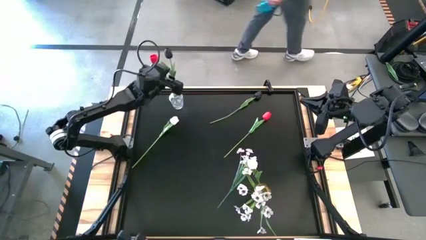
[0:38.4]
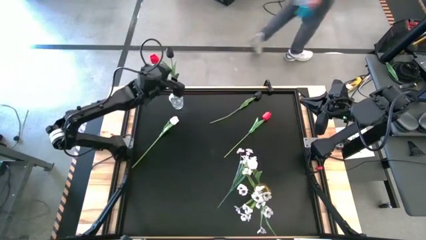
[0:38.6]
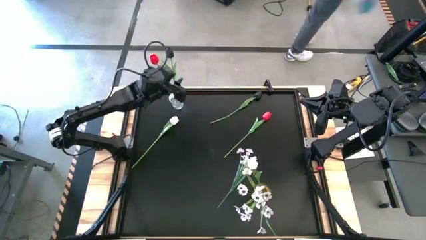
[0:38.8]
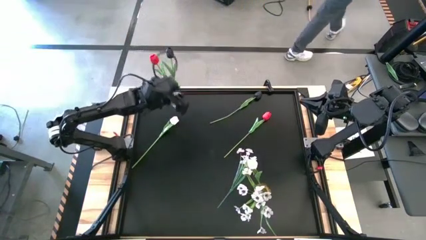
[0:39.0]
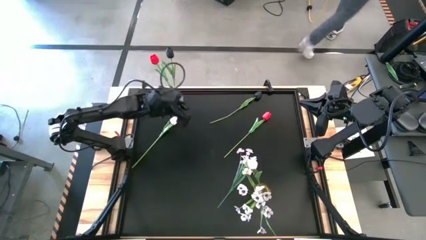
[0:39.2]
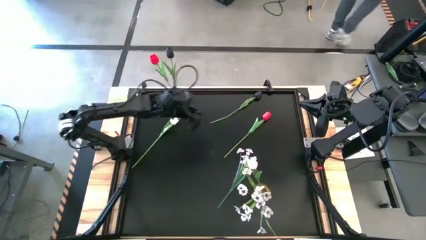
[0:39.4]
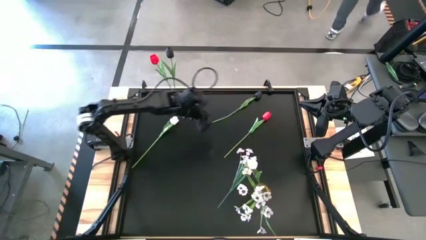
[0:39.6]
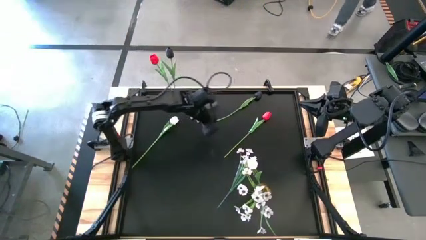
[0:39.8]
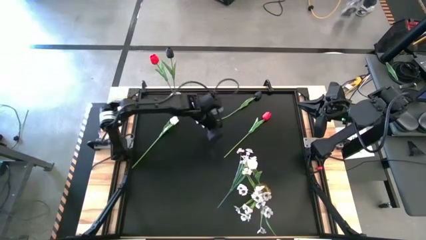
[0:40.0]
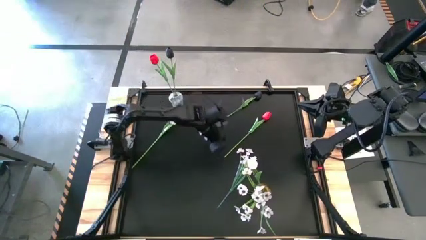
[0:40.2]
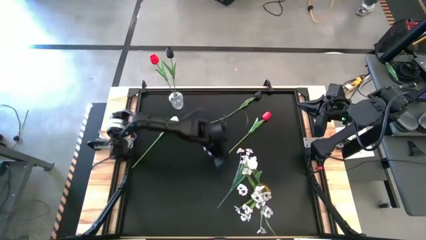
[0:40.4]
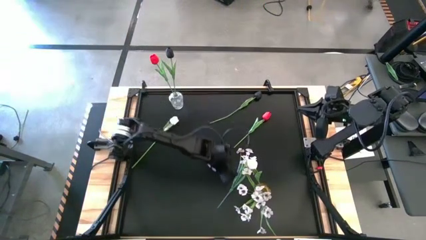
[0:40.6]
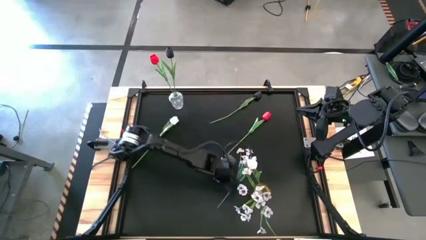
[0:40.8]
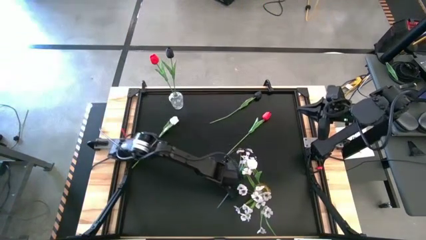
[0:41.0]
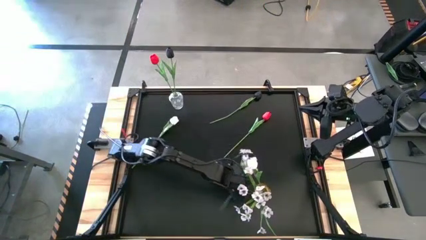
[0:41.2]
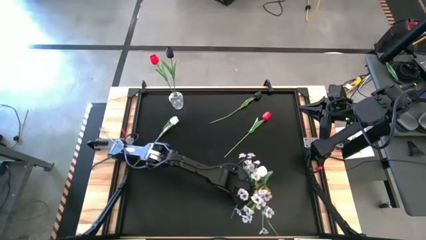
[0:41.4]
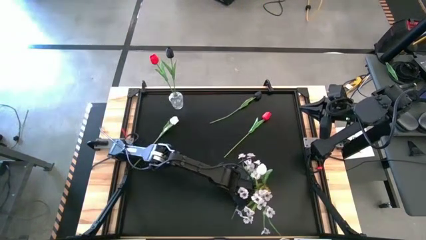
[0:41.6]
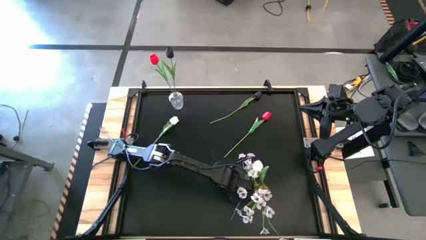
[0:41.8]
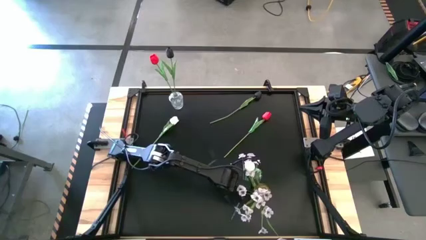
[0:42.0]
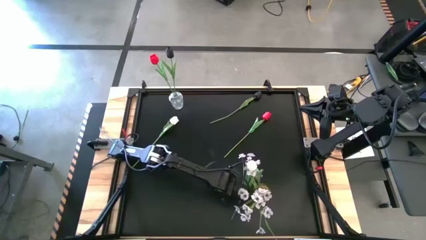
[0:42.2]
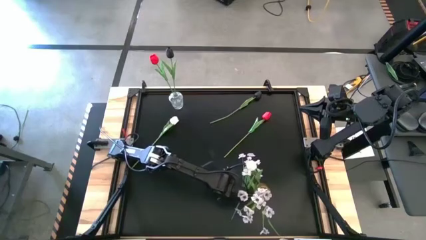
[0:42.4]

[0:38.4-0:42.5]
Task: Sort flowers into vase by color
Put the white flower into the yellow vase

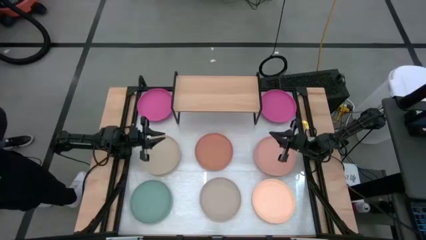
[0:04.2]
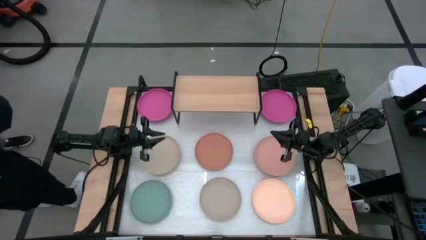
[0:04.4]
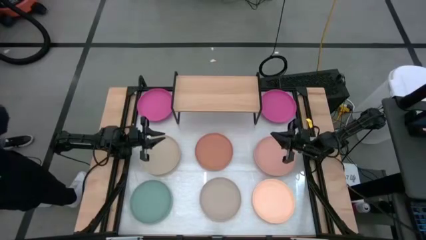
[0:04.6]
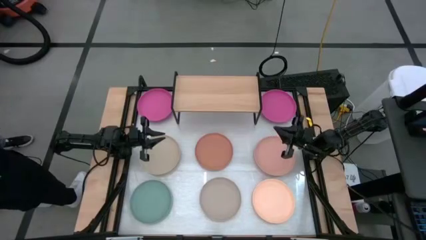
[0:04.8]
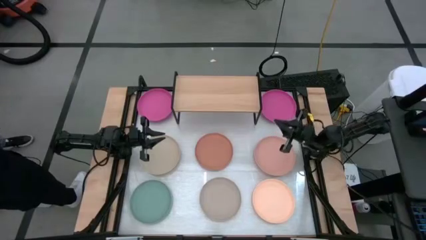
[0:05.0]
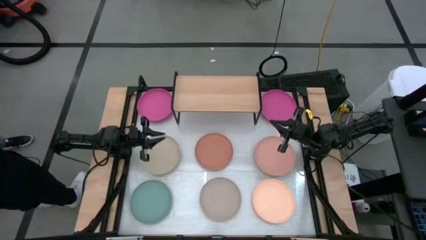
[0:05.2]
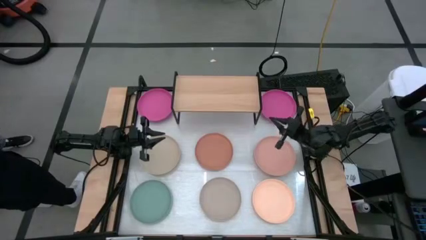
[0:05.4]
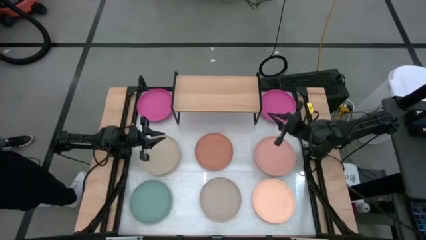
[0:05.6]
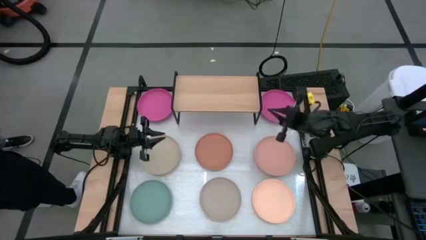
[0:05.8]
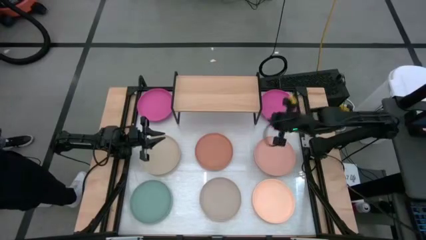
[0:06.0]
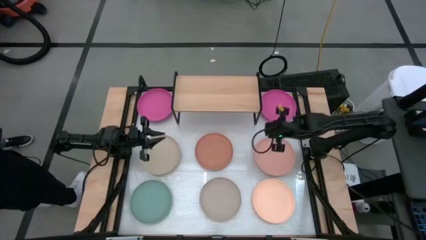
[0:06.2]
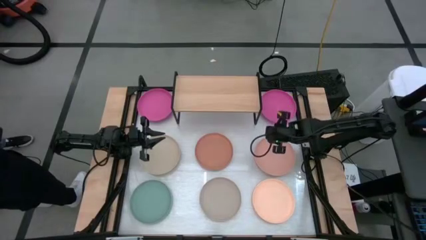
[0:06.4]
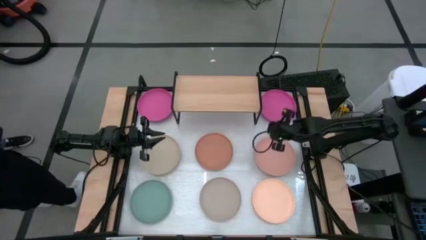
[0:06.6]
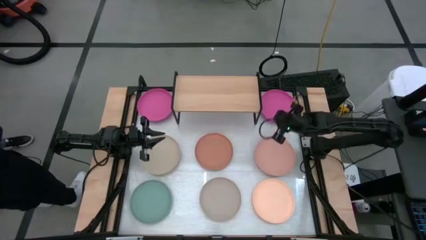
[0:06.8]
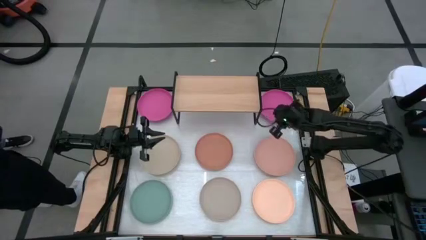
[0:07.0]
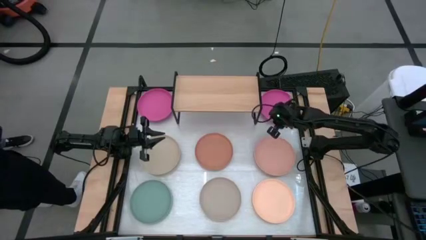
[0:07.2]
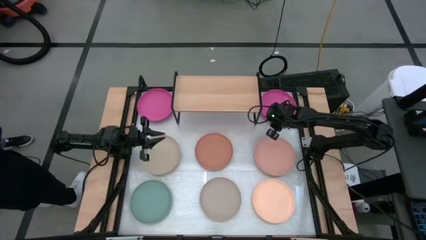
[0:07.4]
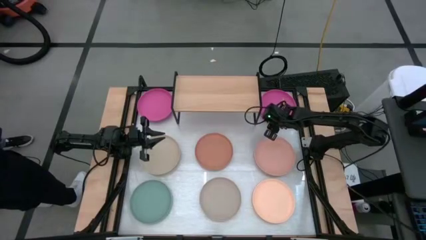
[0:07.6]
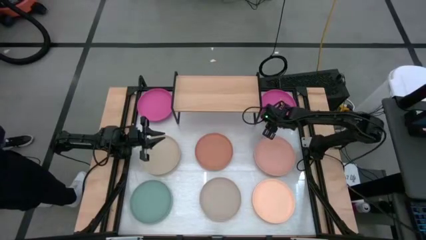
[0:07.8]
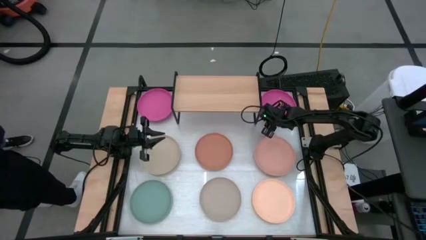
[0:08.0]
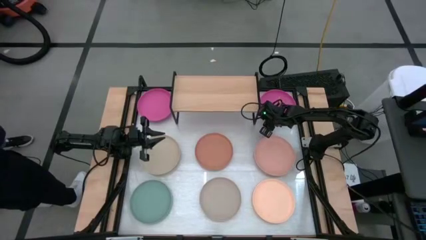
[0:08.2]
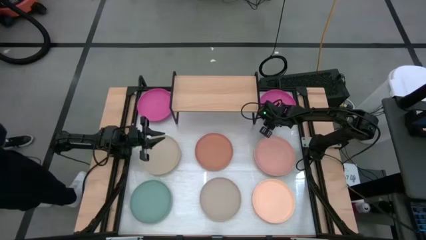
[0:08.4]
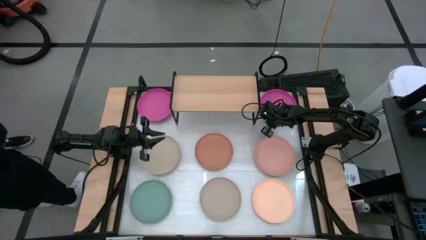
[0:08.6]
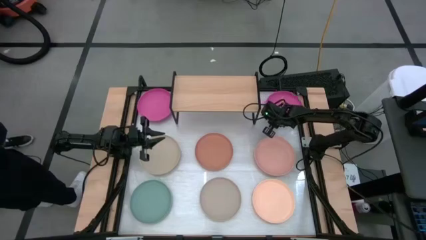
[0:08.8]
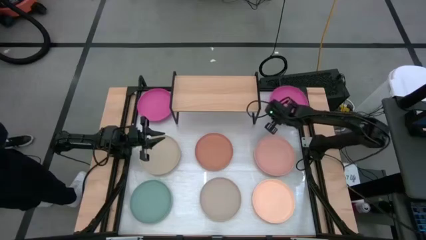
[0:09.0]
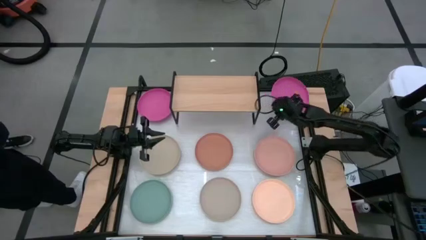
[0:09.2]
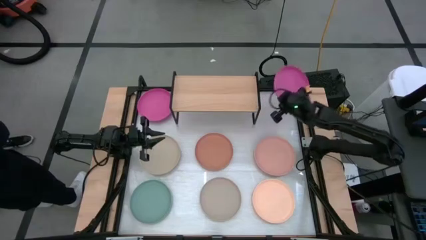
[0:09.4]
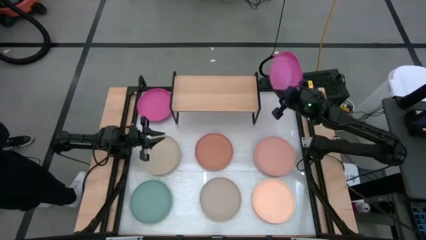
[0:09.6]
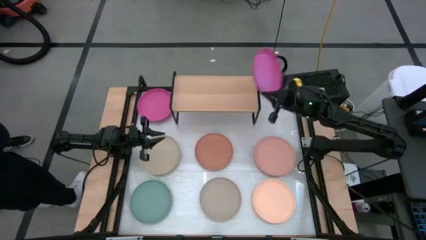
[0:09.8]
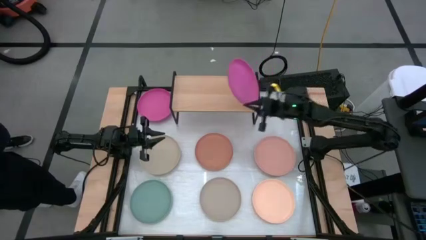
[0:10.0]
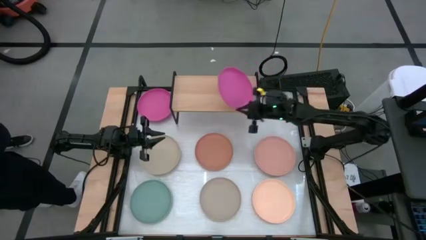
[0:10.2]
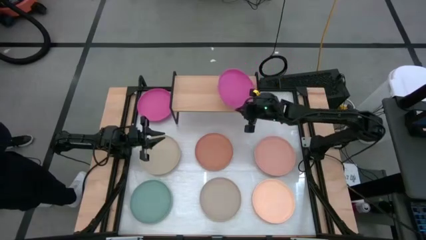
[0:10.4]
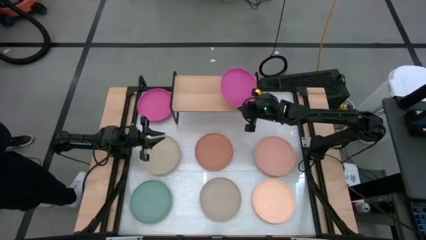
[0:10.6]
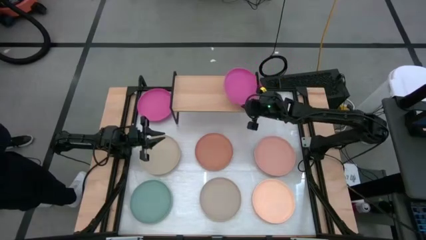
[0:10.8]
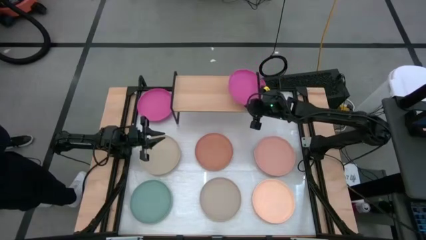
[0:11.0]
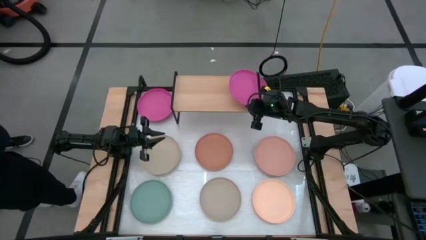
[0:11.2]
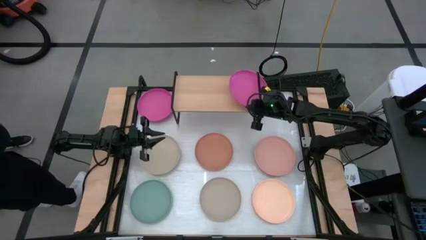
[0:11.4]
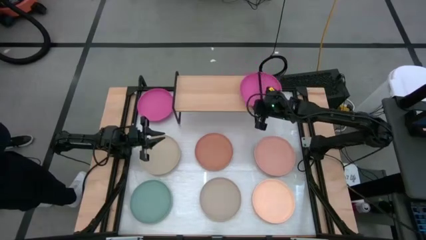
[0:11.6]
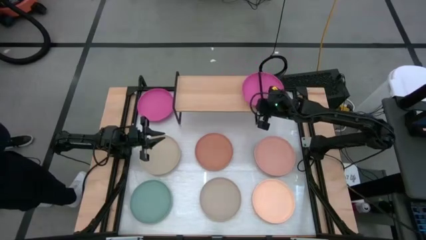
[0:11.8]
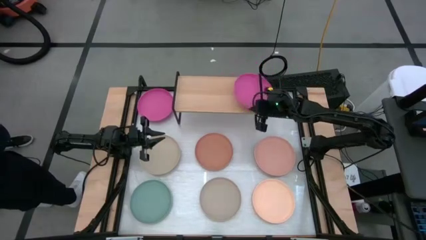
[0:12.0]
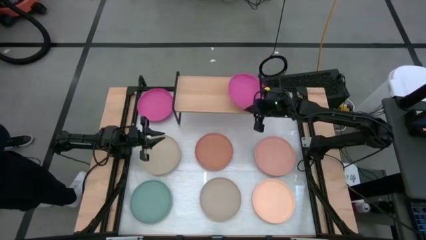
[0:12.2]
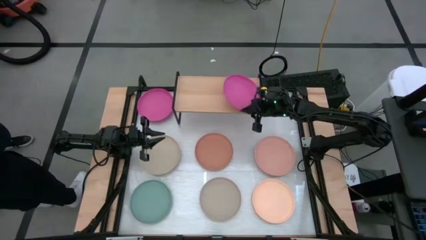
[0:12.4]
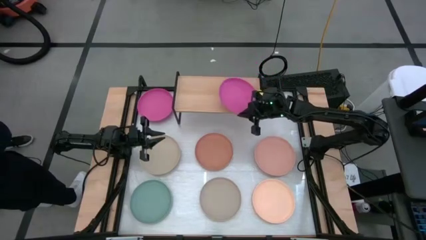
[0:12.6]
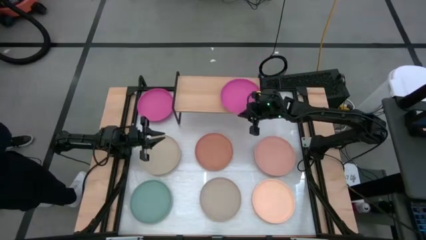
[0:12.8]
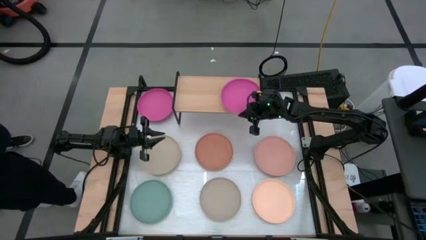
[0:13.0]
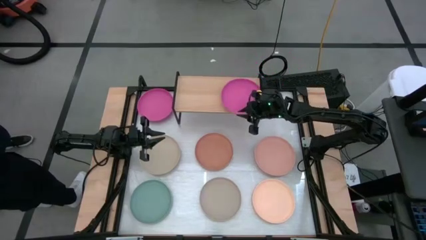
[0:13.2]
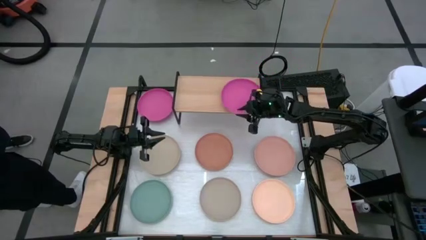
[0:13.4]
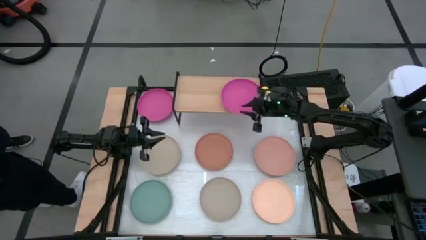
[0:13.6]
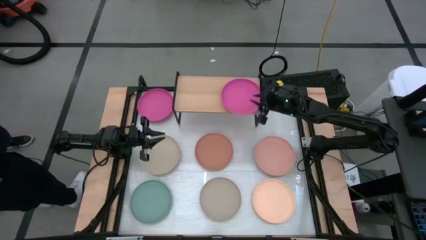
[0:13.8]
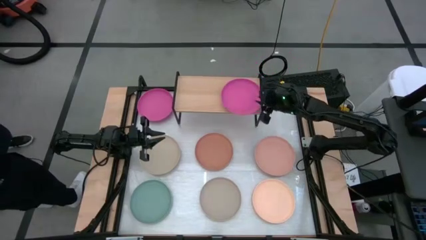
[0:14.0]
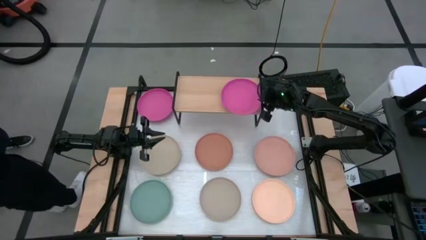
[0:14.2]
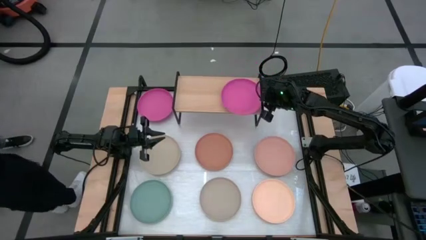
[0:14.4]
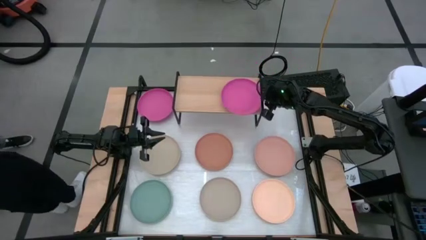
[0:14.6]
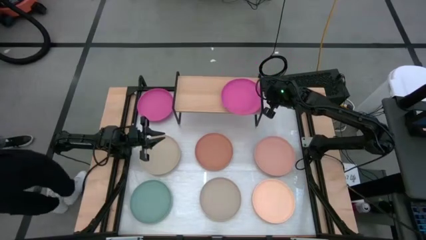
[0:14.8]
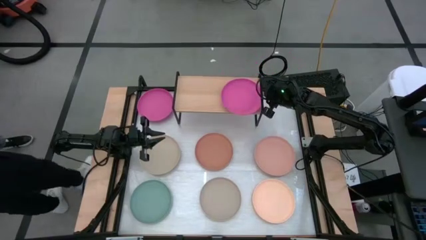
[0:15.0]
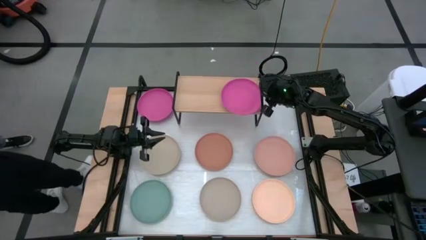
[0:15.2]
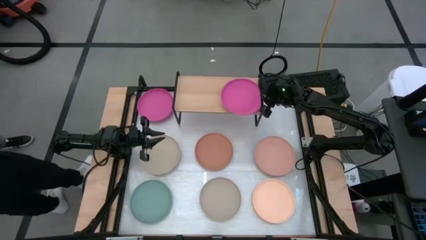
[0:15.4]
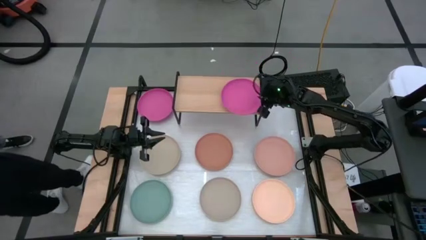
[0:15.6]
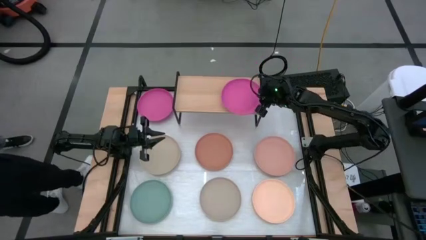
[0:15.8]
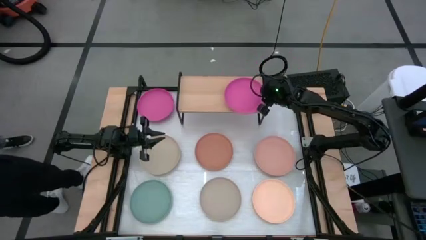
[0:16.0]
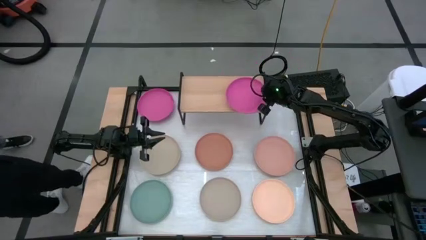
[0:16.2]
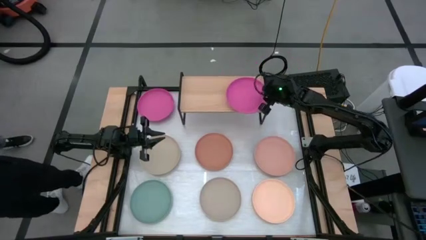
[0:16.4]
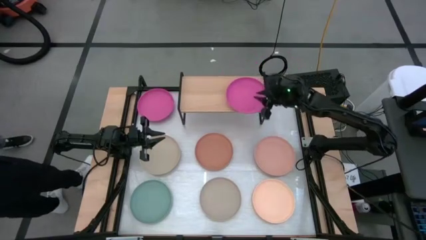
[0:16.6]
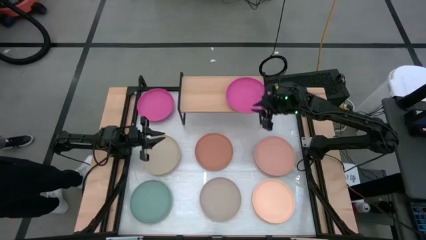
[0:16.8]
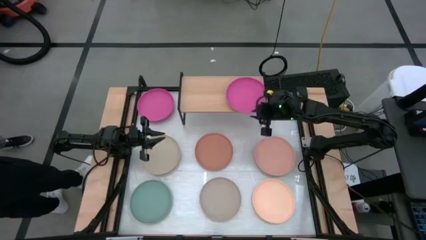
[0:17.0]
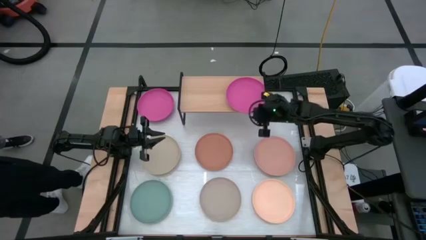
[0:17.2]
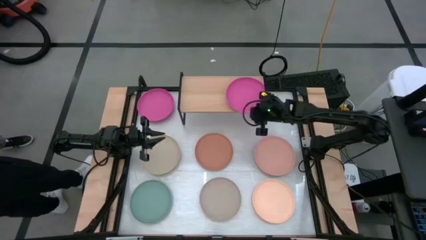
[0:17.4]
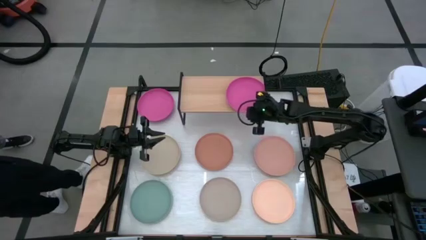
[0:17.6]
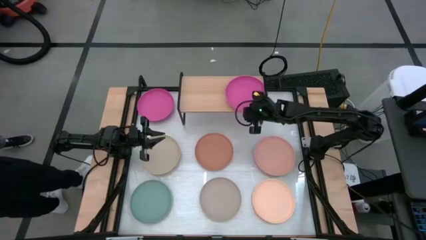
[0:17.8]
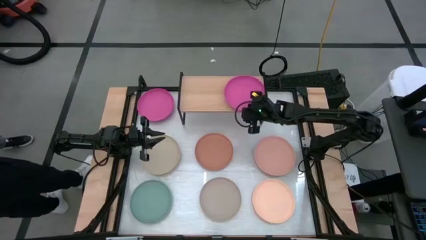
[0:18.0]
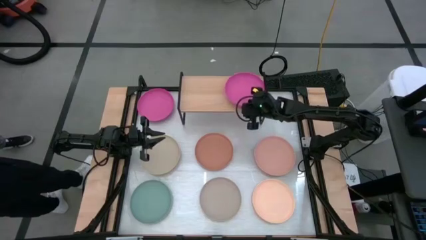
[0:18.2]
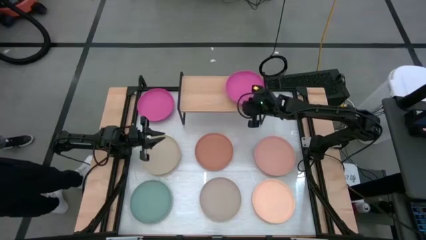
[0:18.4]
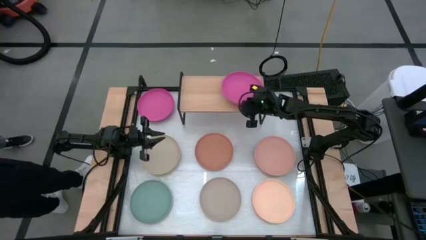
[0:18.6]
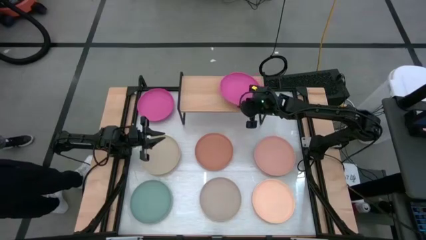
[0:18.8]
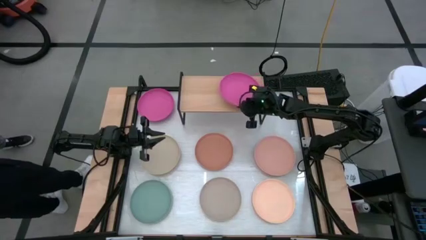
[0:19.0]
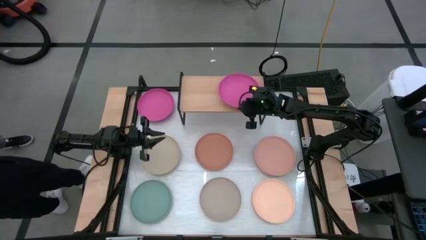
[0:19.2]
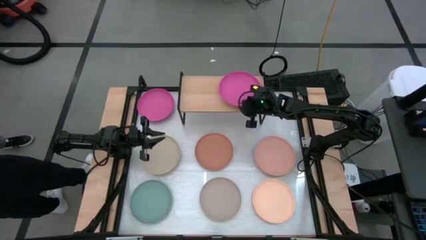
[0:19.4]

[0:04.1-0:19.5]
Task: Place and stack plates onto a shelf
Put the right pink plate on the shelf
